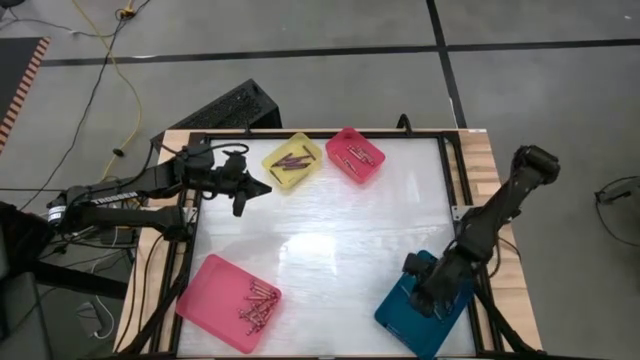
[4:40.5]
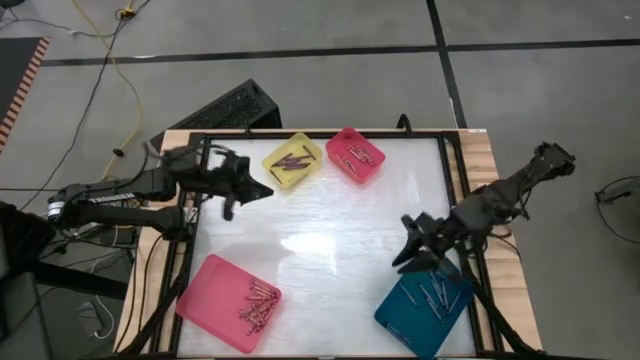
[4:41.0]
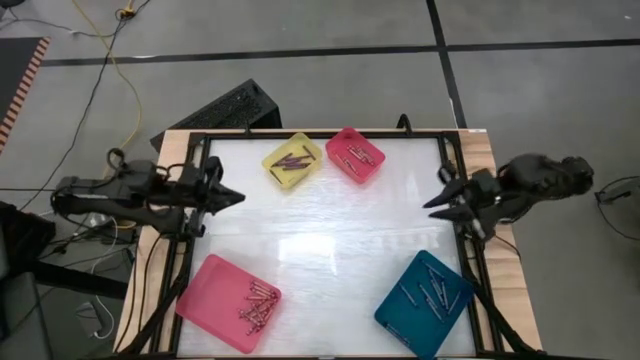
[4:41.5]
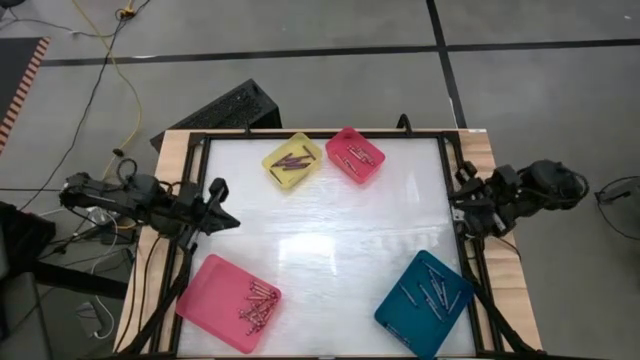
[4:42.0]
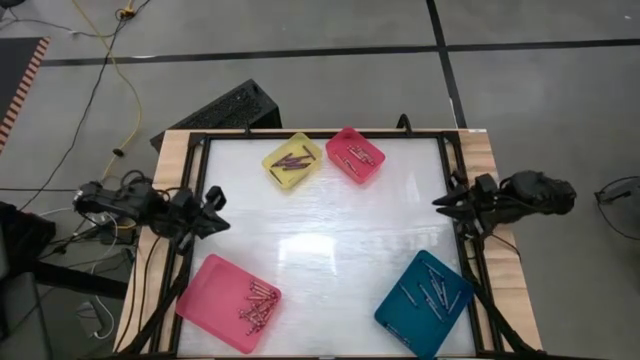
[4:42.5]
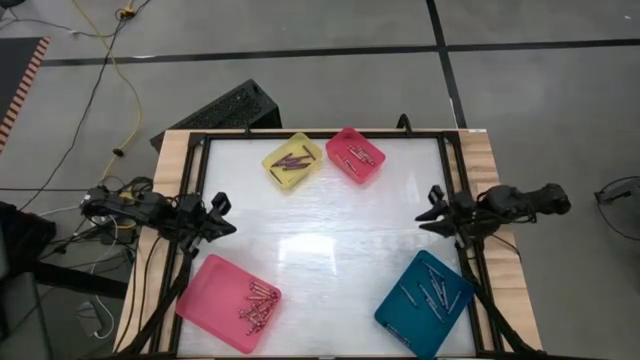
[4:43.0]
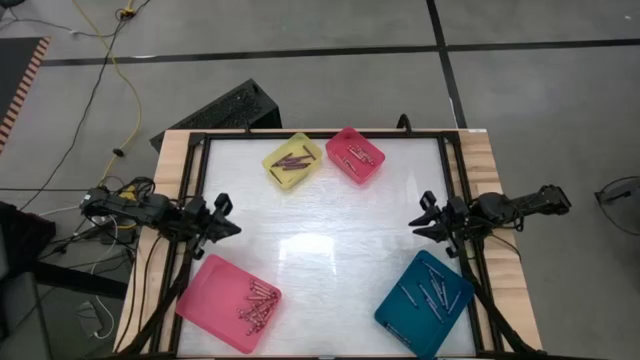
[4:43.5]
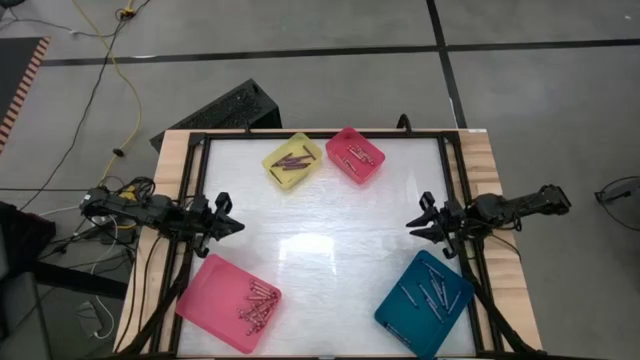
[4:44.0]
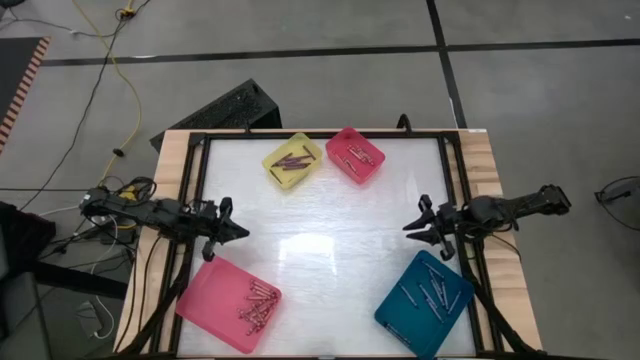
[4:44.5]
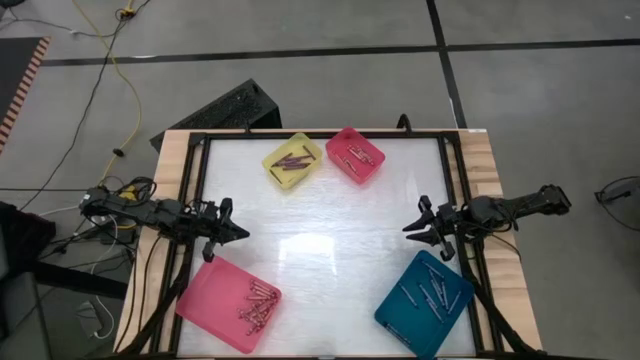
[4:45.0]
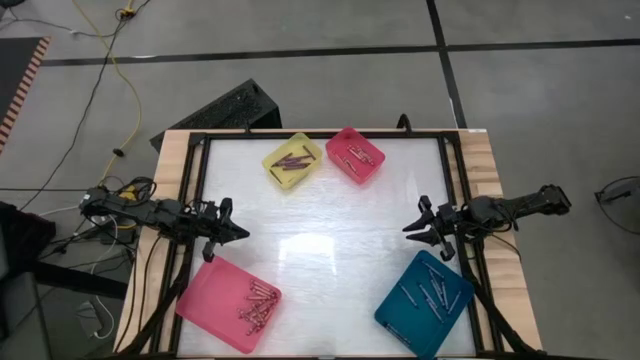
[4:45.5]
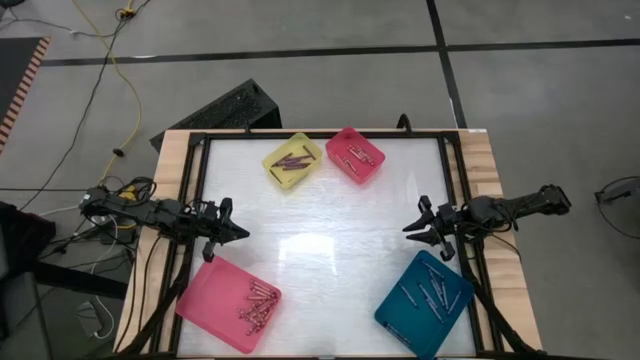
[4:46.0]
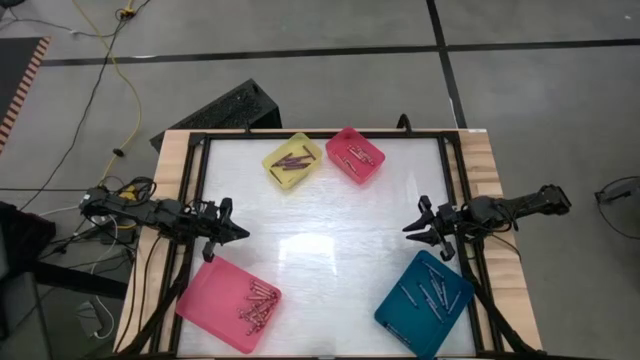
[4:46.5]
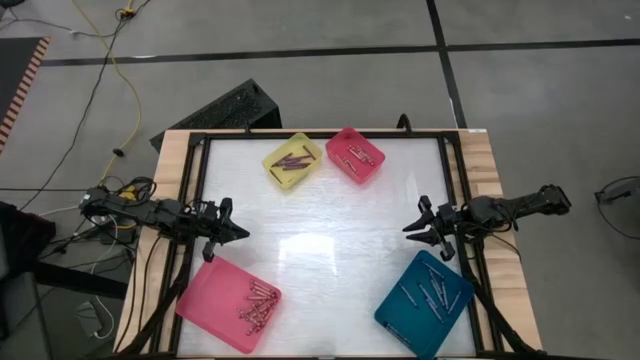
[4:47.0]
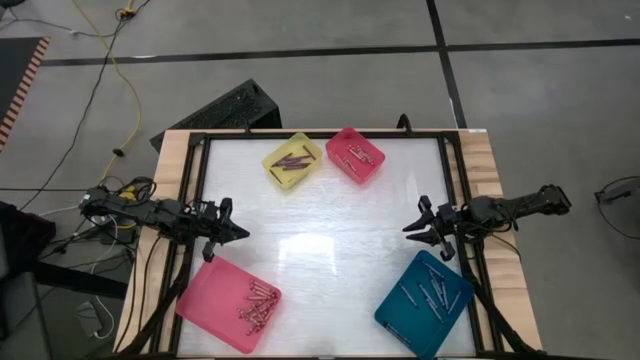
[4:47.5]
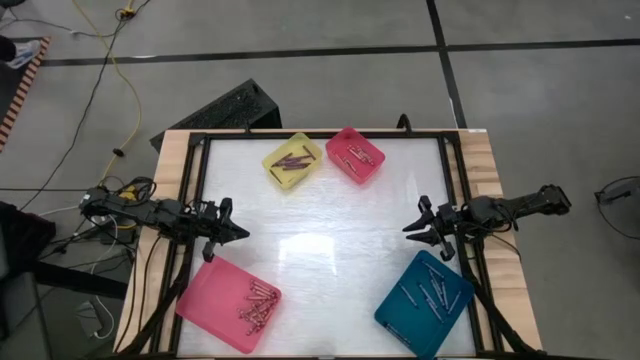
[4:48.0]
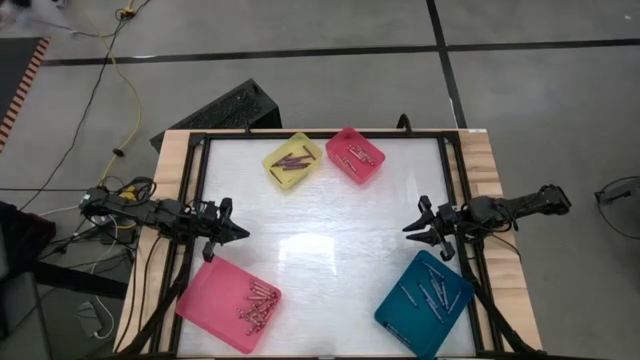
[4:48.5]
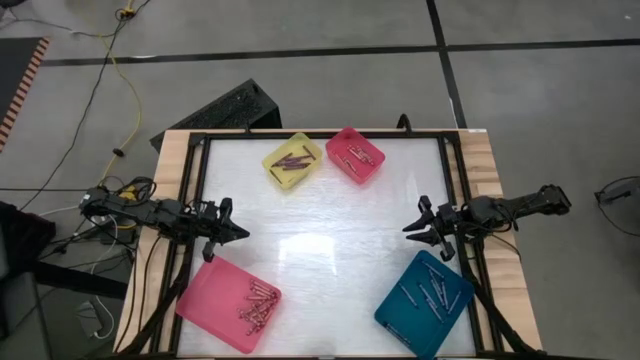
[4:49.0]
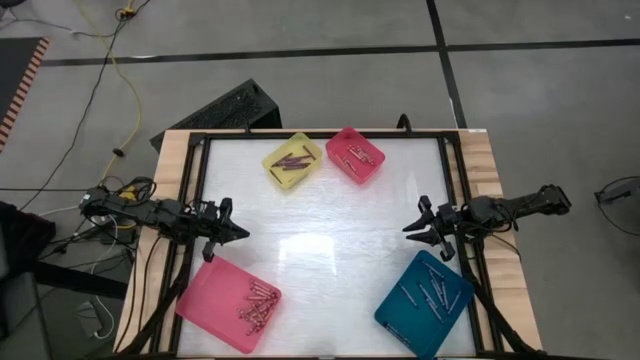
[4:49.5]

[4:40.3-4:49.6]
Task: Sort crayons
Return to Home Position

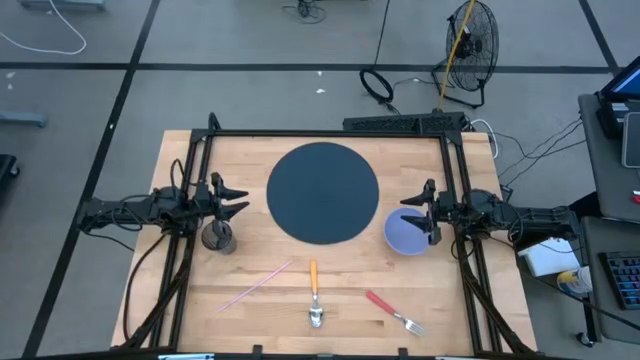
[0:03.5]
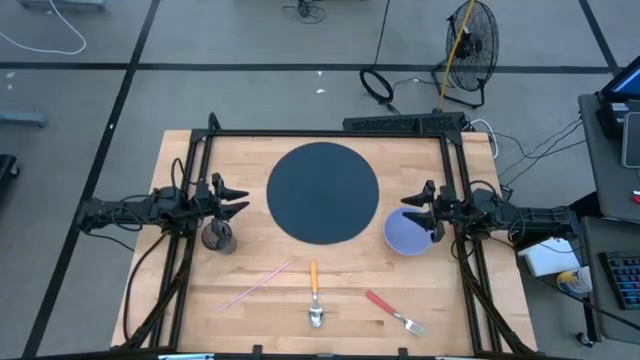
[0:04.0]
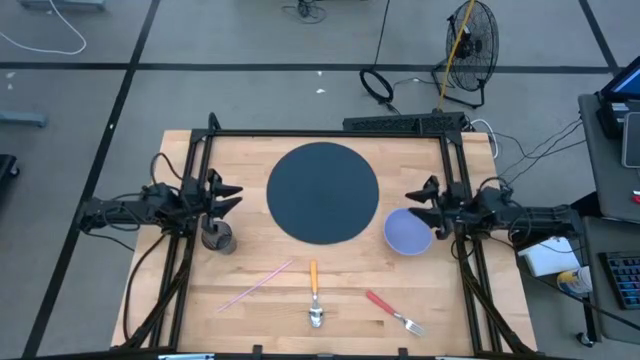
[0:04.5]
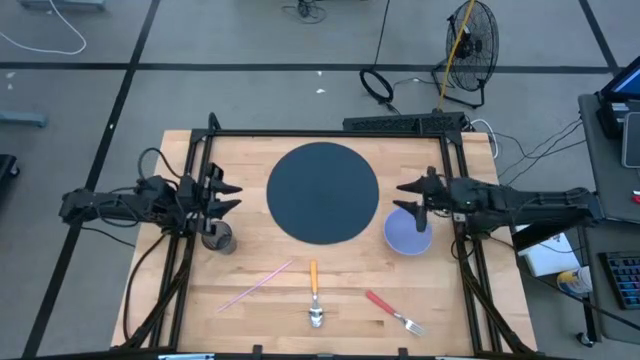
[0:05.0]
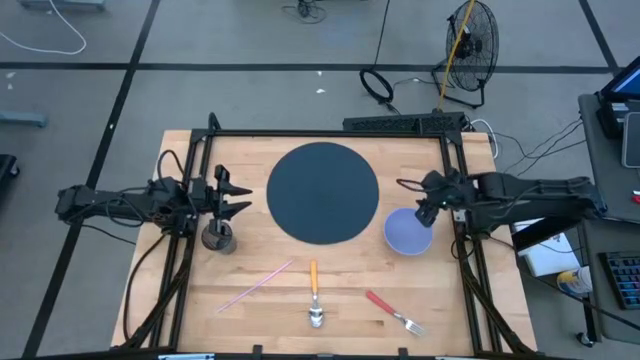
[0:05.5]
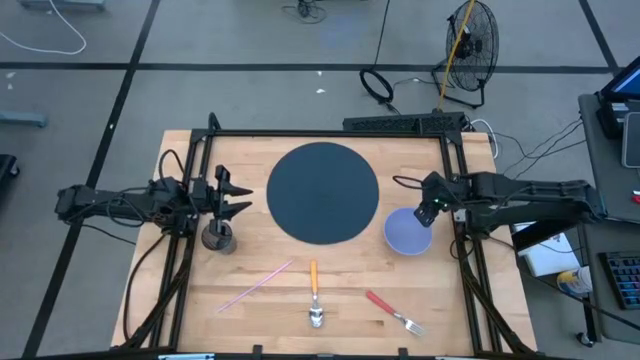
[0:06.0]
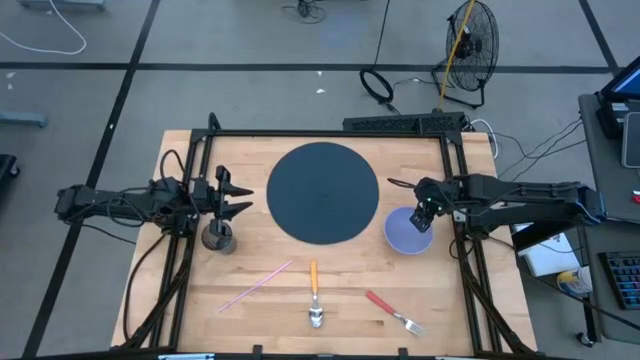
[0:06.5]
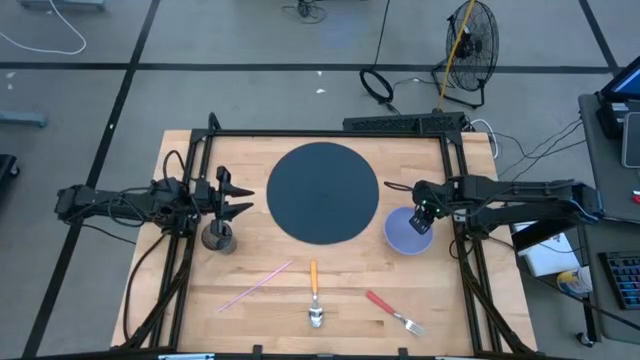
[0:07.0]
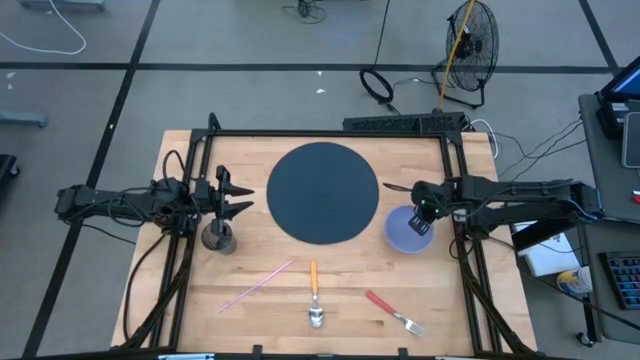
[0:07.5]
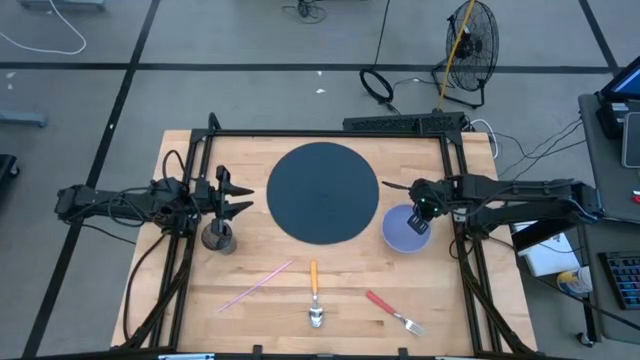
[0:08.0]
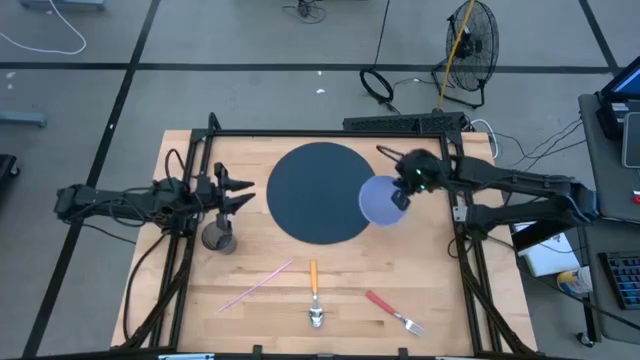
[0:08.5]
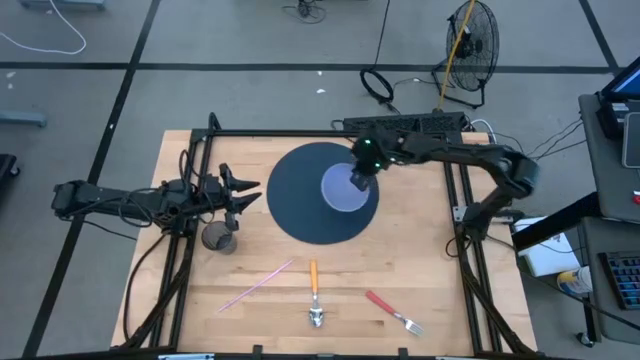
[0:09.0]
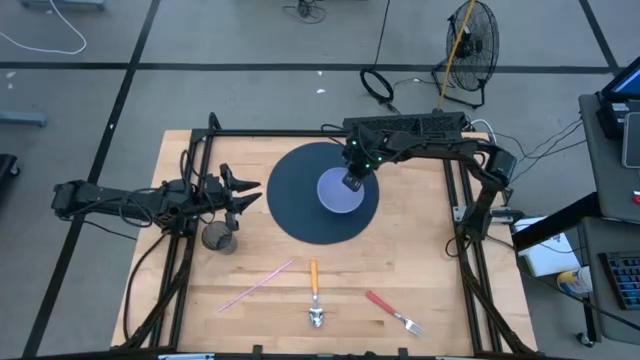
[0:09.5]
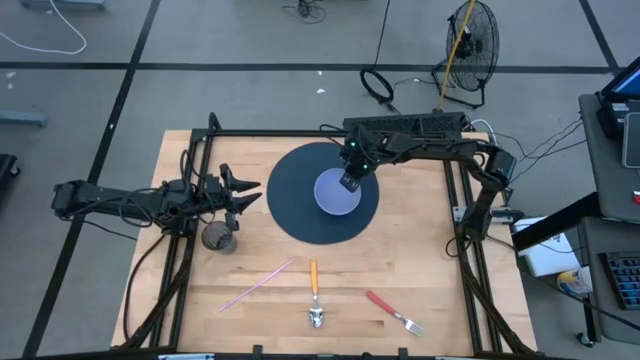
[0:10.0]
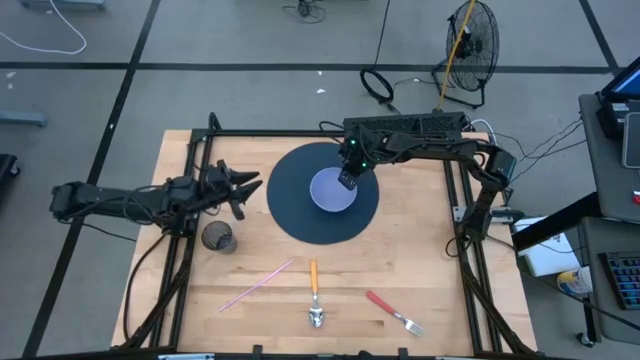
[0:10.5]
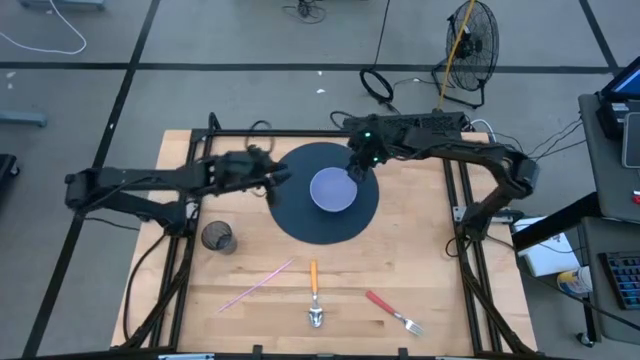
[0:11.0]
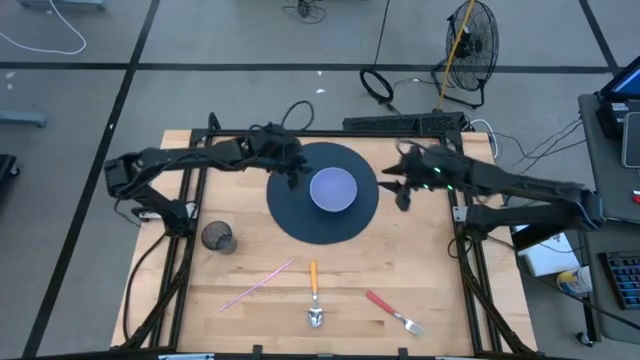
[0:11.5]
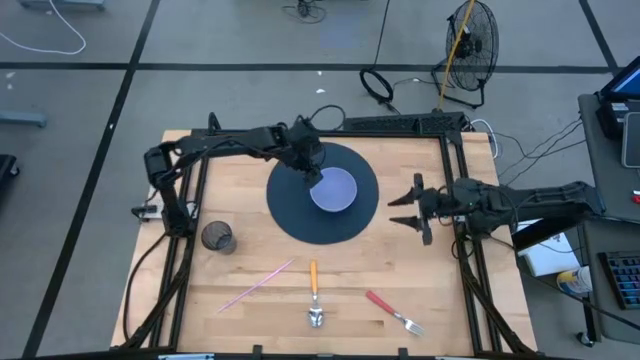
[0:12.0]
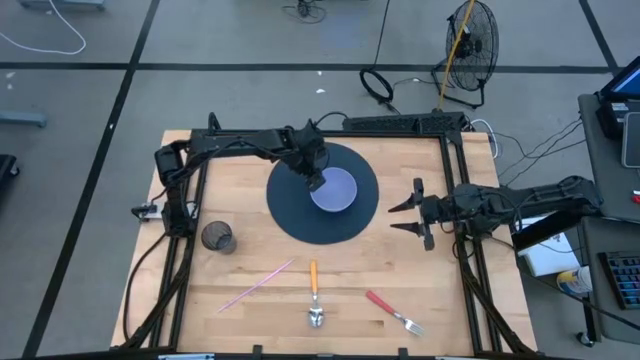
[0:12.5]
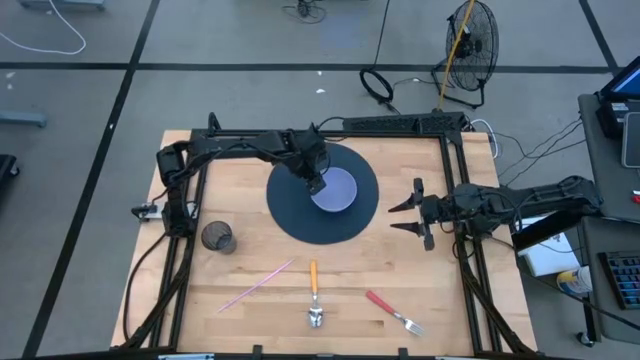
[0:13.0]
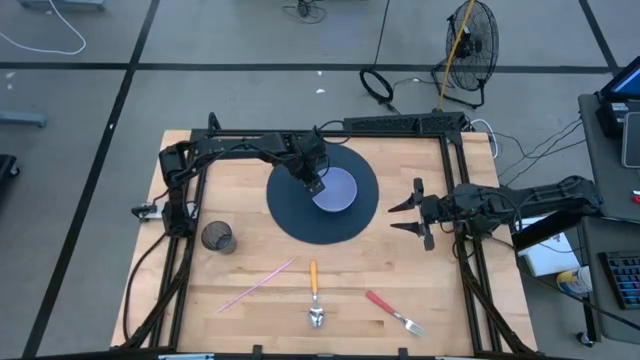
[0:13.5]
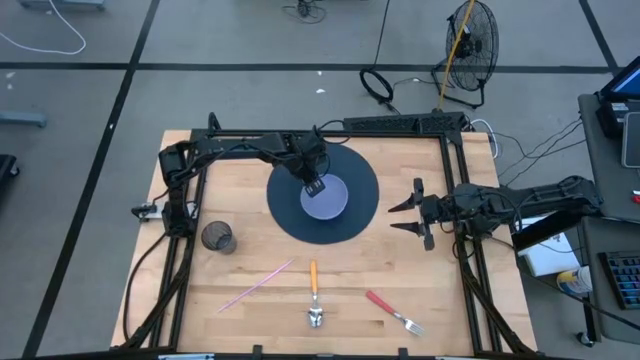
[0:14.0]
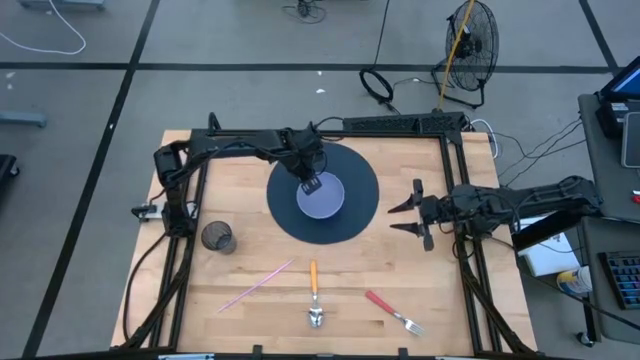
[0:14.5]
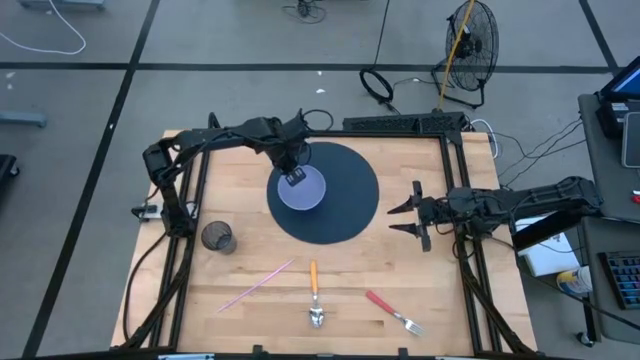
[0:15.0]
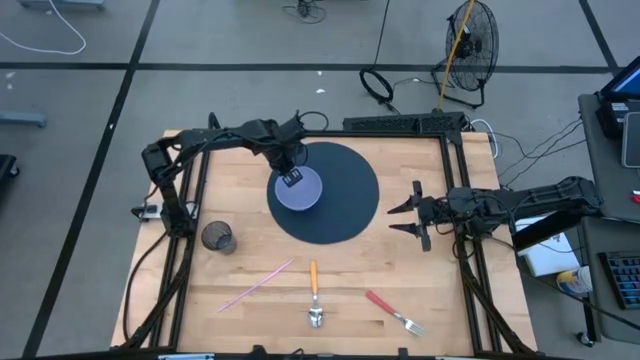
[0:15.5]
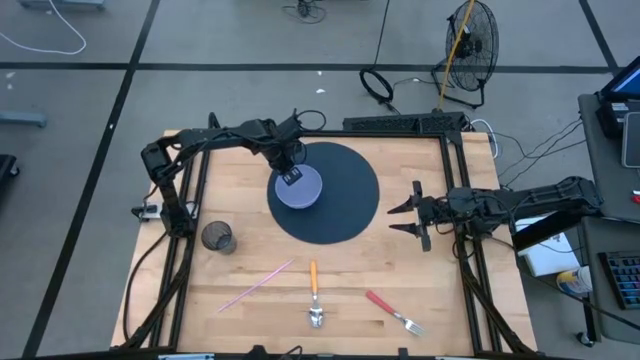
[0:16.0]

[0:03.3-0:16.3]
Task: Pick & Place Utensil
Put the purple bowl on the mat
